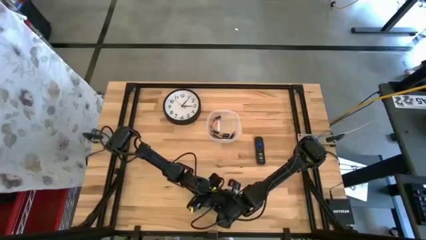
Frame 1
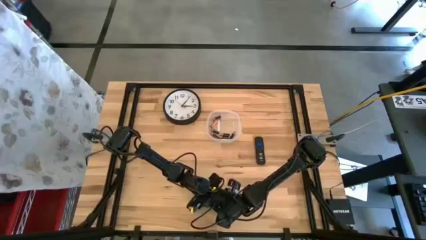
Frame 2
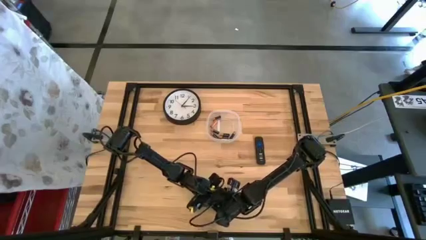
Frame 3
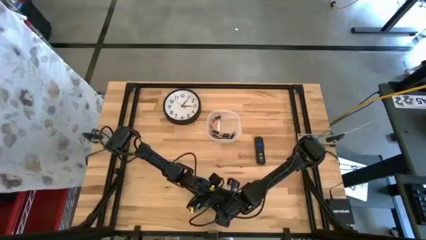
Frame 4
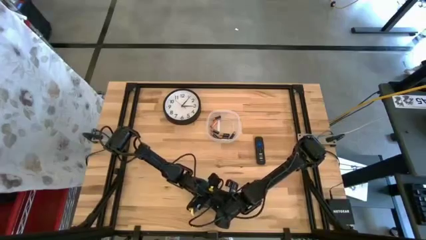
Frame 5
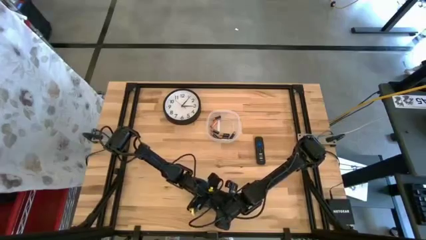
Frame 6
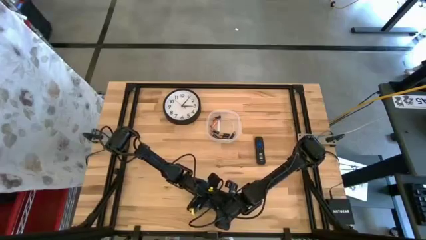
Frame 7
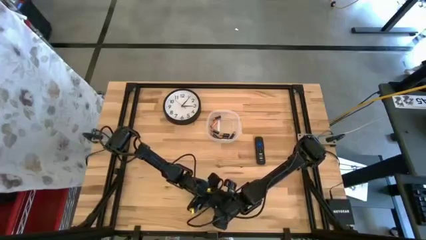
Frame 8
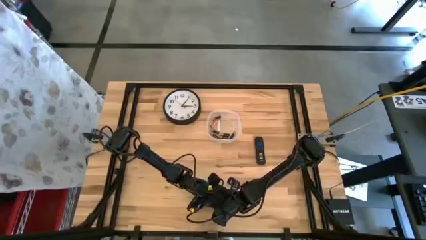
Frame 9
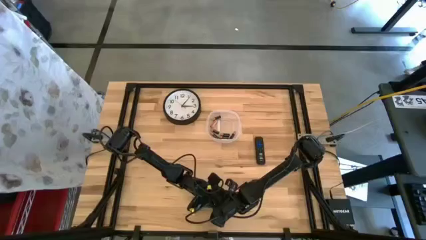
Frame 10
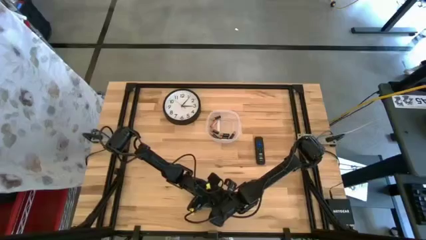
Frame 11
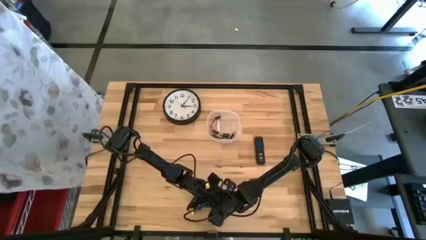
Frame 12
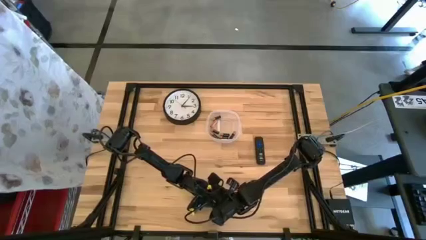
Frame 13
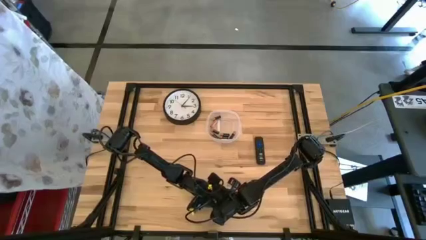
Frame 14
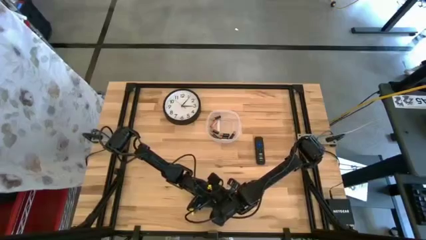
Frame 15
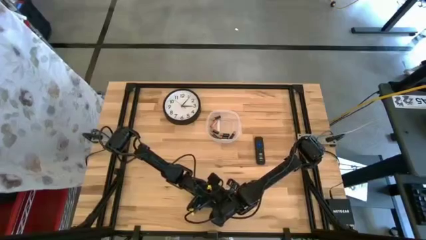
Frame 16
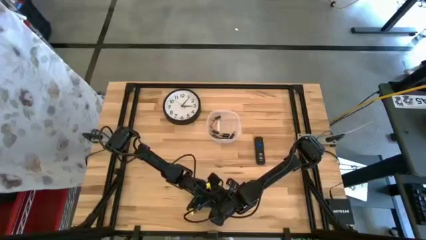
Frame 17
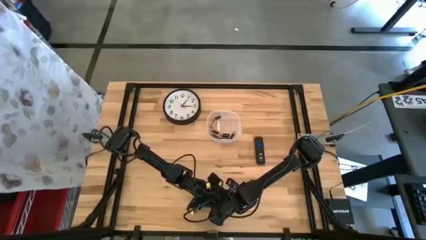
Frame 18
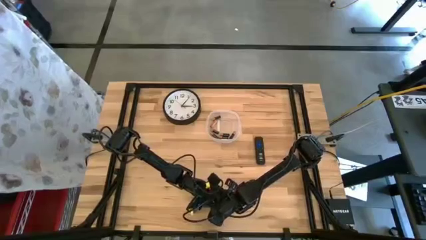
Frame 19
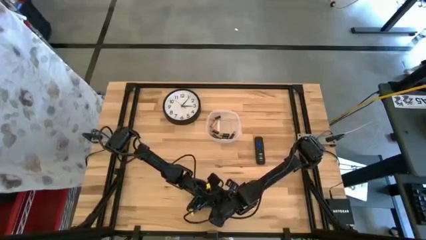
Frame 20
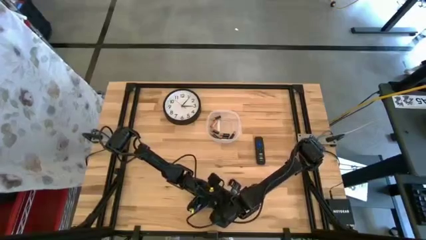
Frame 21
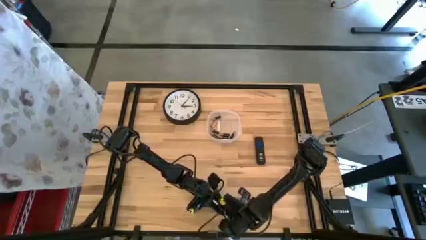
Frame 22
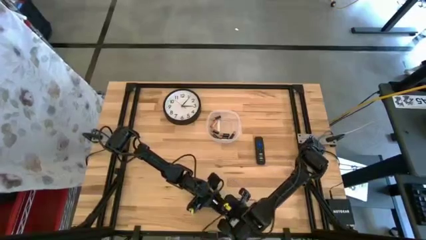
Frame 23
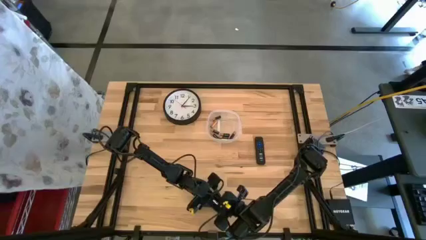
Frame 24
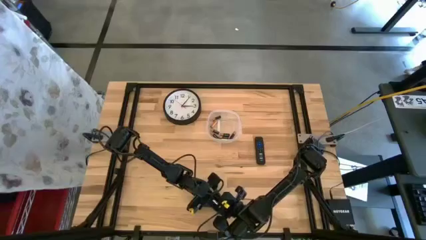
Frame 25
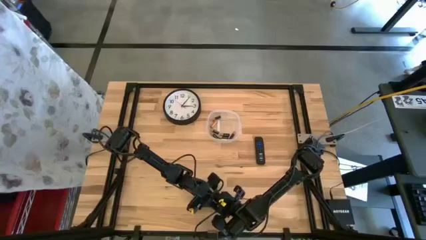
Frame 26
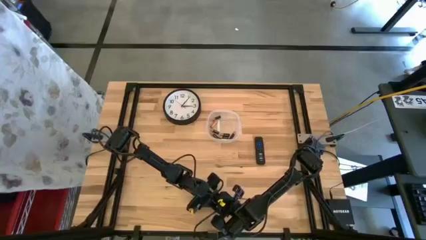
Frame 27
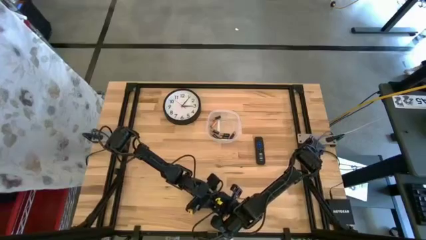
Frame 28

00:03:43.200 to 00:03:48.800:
Task: Insert battery
Insert the silver battery into the computer mouse

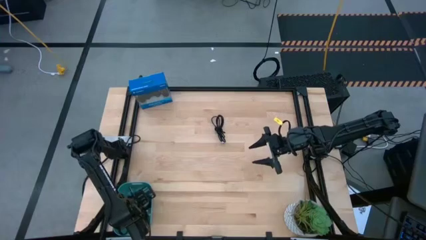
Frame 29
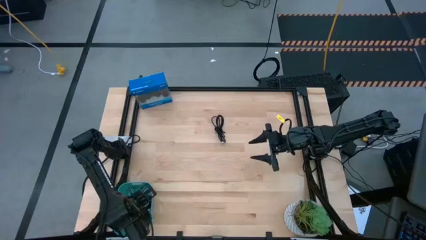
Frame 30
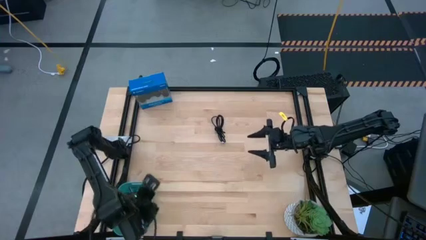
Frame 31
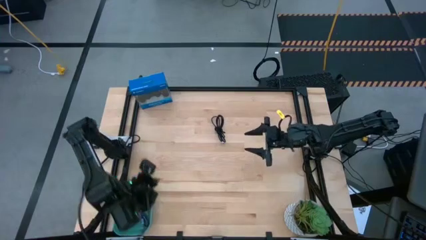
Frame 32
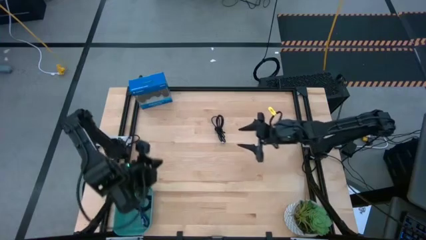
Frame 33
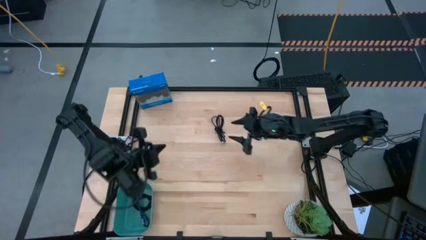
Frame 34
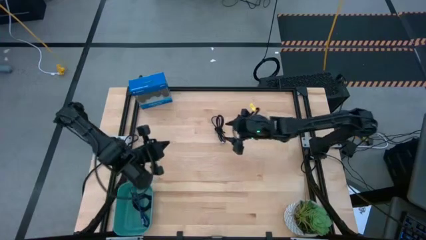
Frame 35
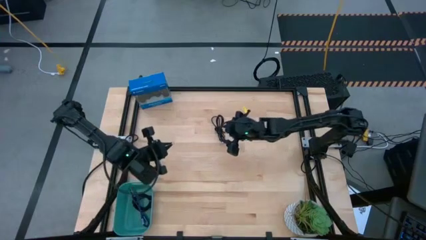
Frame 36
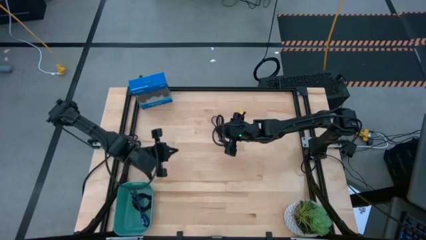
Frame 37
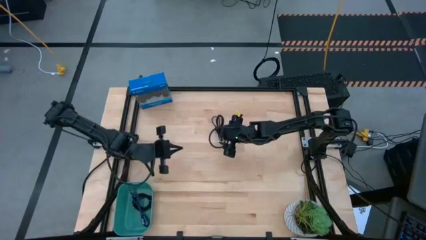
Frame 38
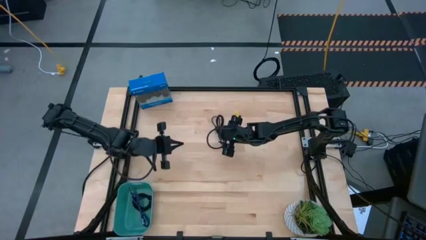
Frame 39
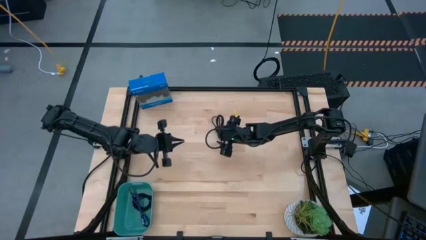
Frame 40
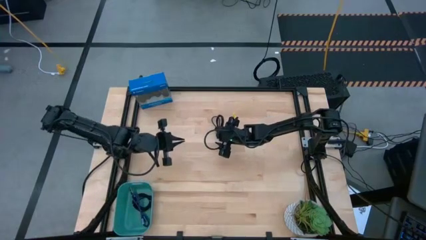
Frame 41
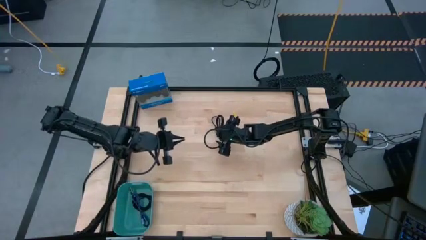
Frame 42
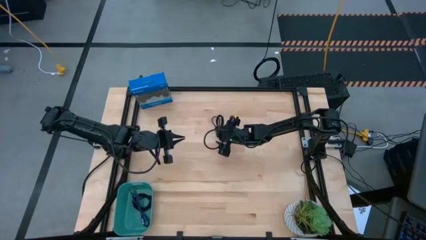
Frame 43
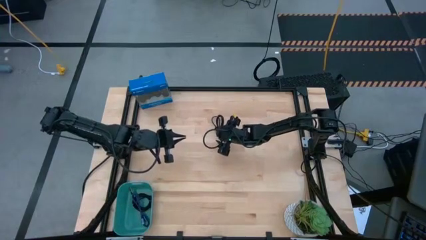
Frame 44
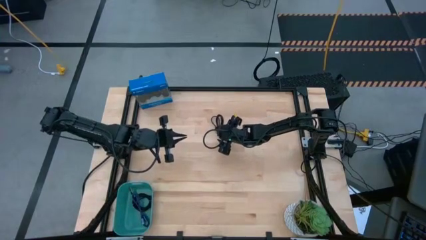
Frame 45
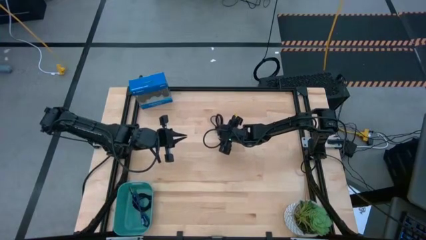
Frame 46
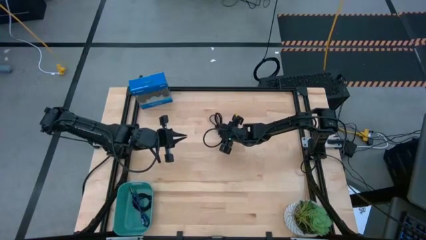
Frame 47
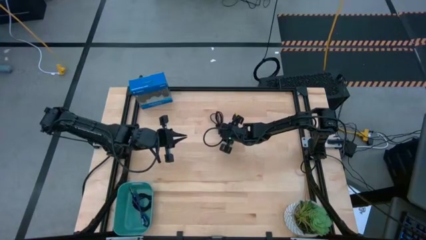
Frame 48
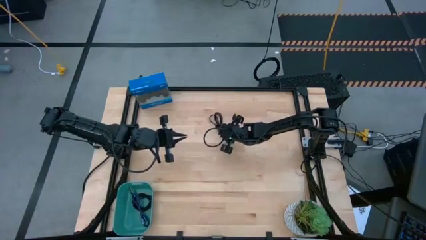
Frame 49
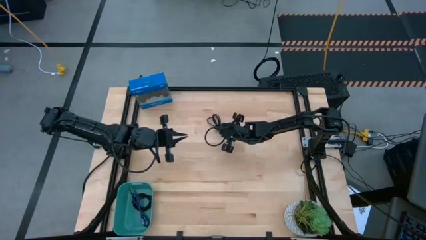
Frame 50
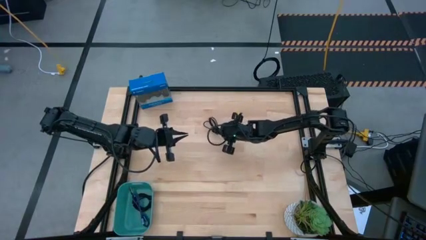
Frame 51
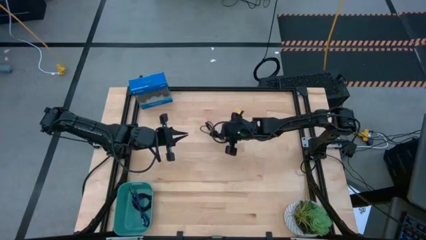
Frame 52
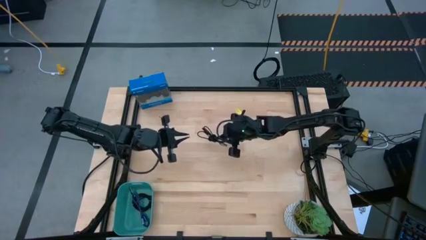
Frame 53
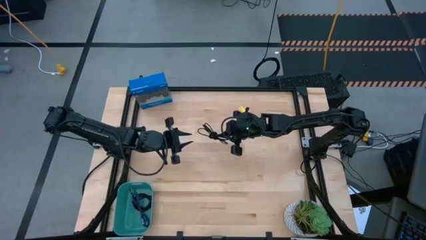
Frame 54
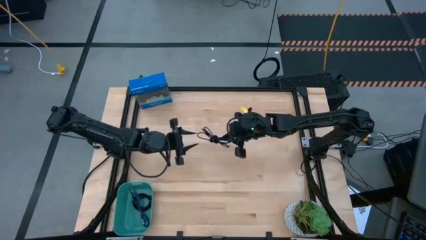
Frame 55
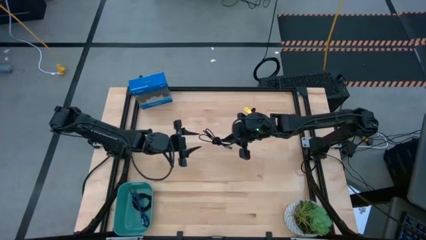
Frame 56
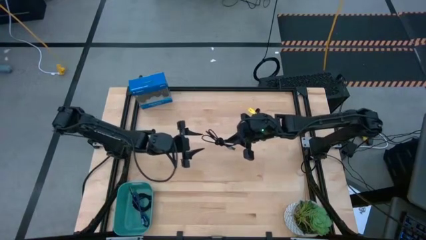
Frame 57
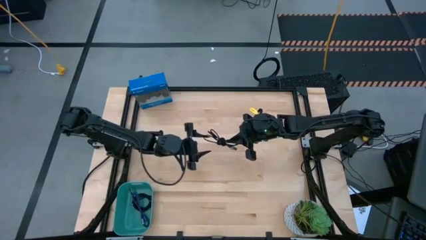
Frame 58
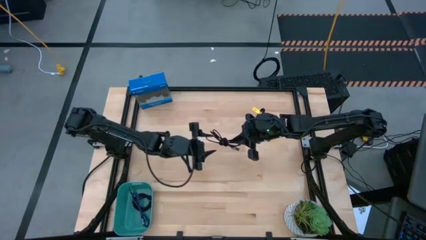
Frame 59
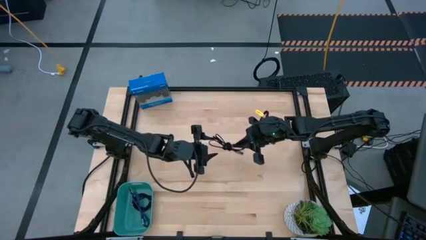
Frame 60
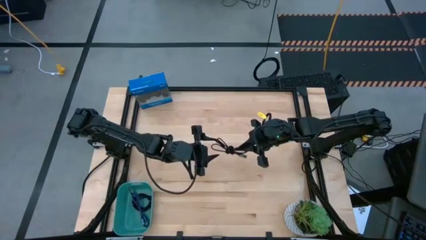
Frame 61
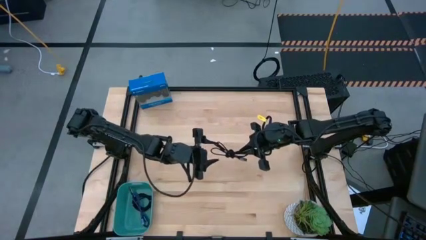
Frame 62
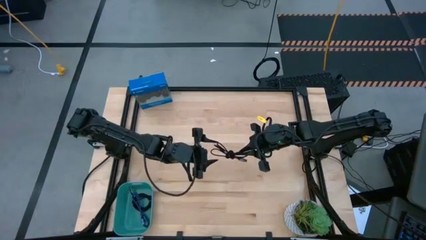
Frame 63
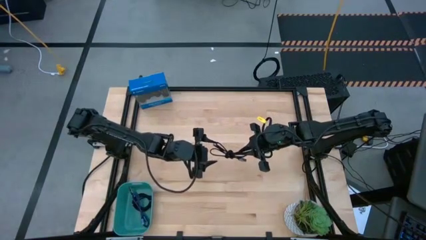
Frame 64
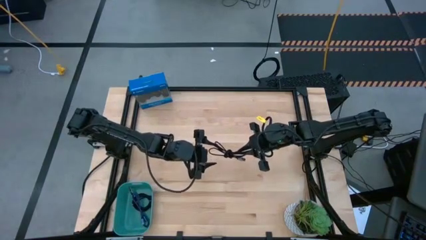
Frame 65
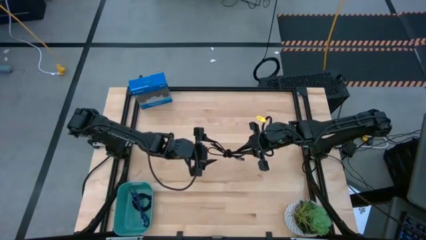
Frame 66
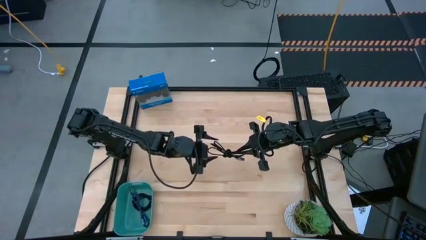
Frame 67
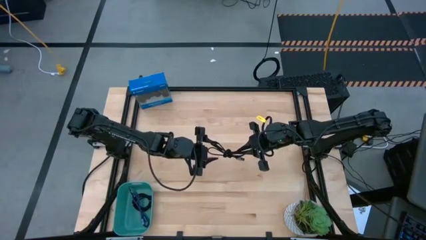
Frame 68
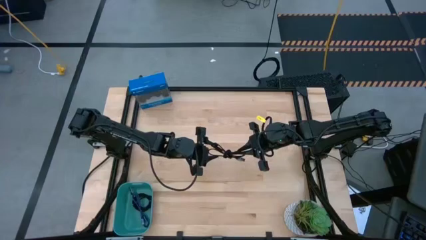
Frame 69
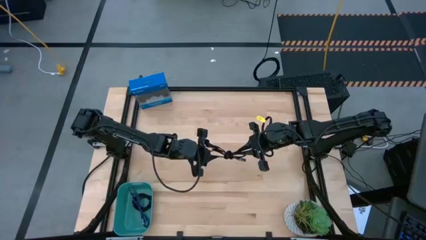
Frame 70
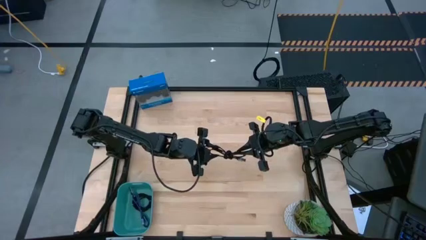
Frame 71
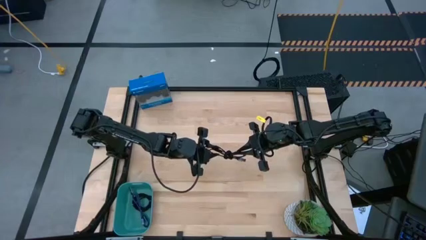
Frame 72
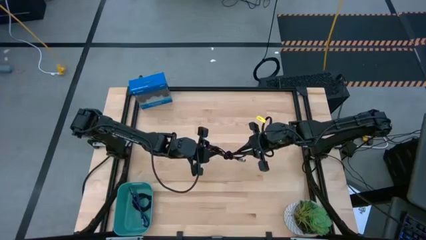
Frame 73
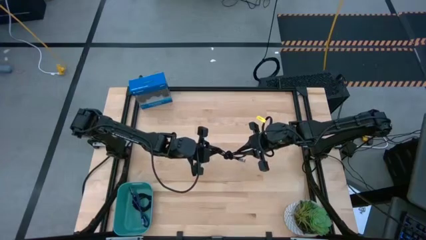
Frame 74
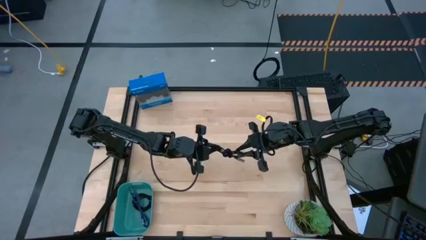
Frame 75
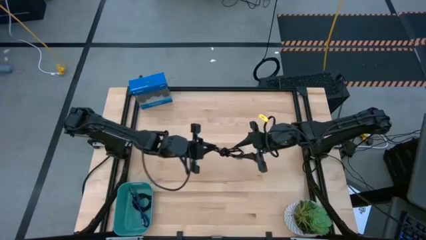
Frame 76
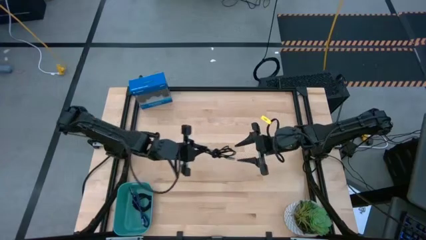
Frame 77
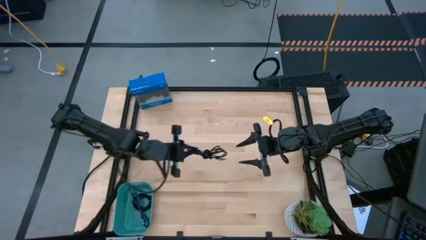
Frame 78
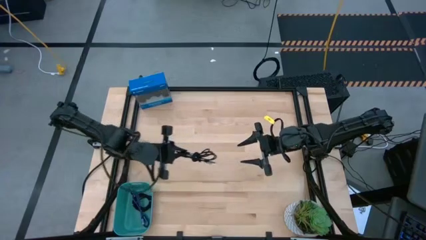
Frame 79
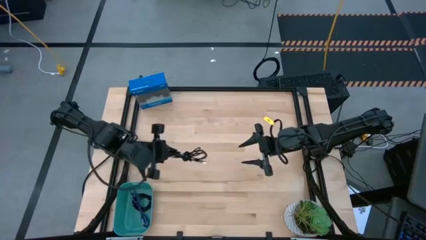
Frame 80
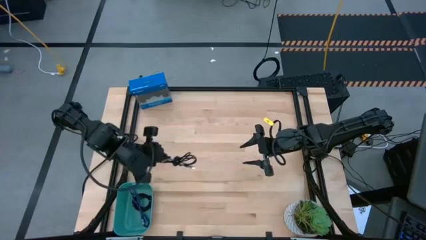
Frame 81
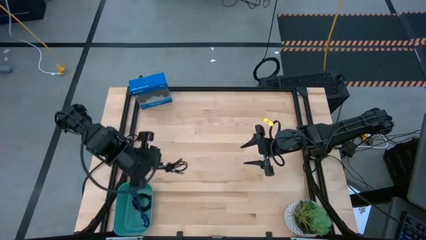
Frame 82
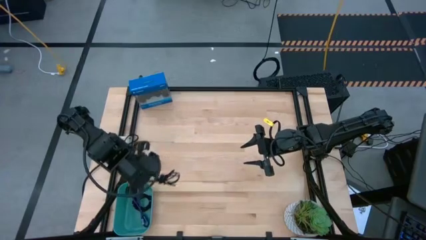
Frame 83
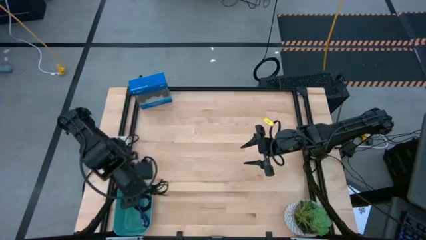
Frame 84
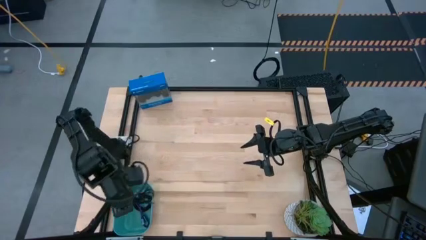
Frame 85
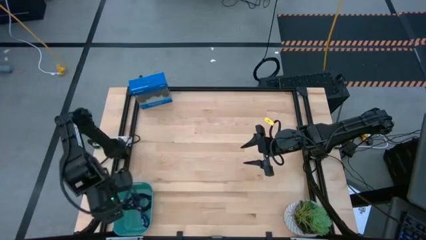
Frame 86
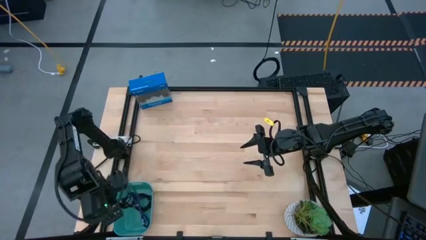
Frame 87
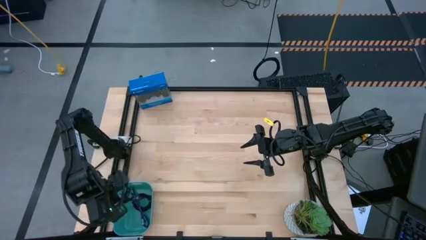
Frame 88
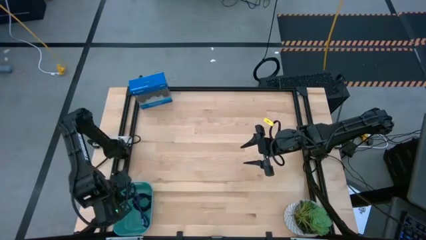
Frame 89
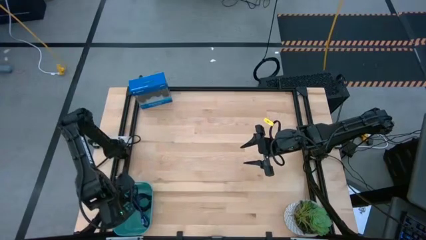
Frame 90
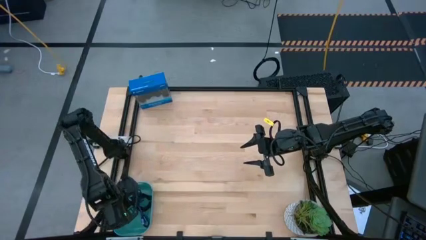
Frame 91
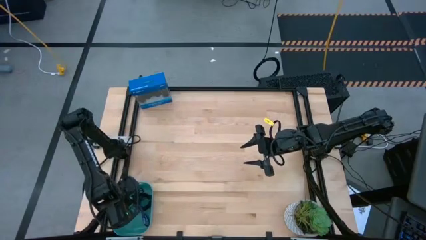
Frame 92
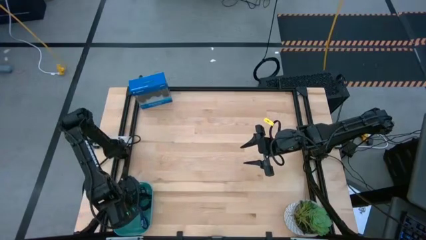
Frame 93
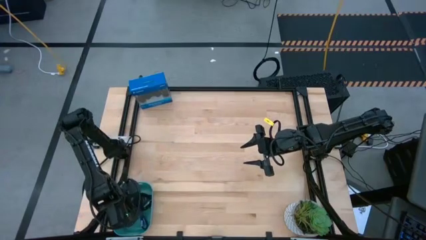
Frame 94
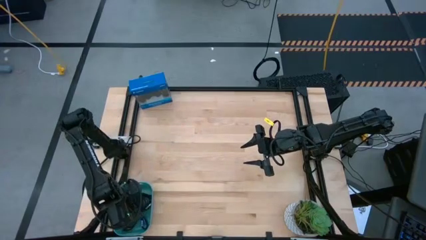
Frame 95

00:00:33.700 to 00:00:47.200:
Task: Pick and place USB-C Cables
Put the black cable into the blue basket
